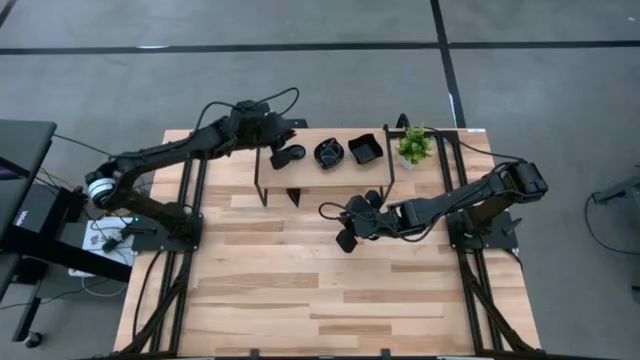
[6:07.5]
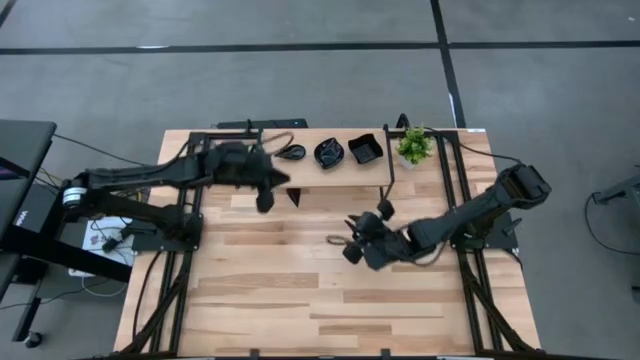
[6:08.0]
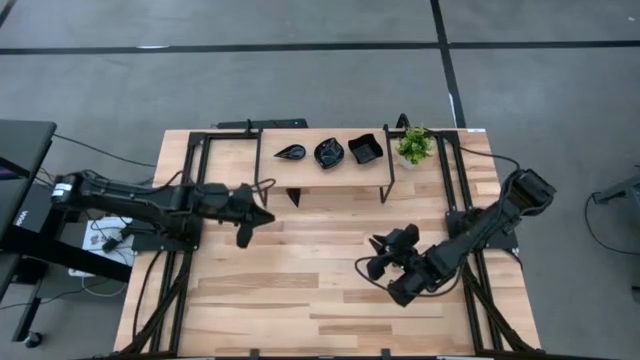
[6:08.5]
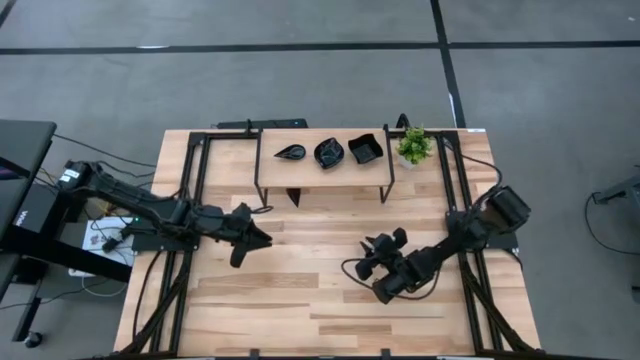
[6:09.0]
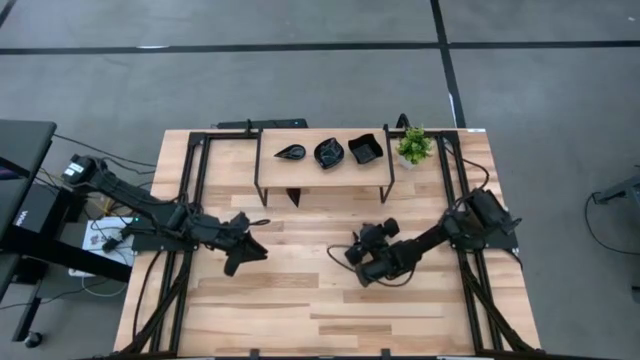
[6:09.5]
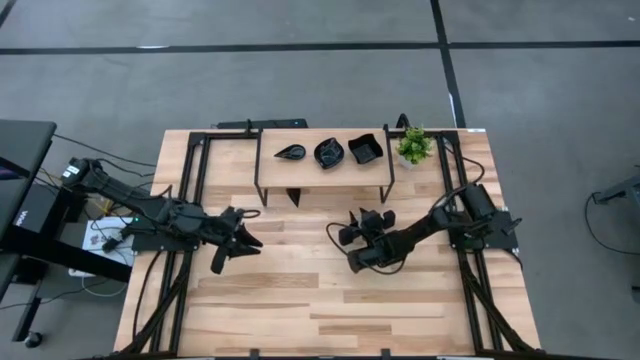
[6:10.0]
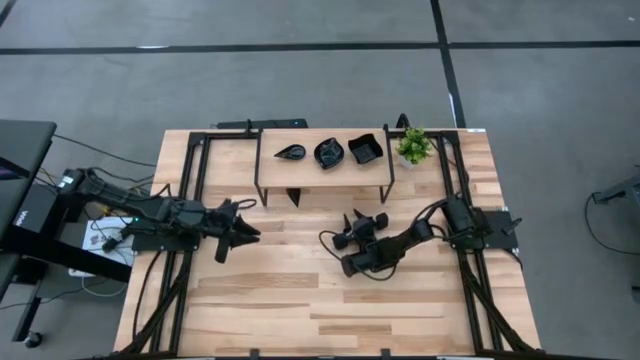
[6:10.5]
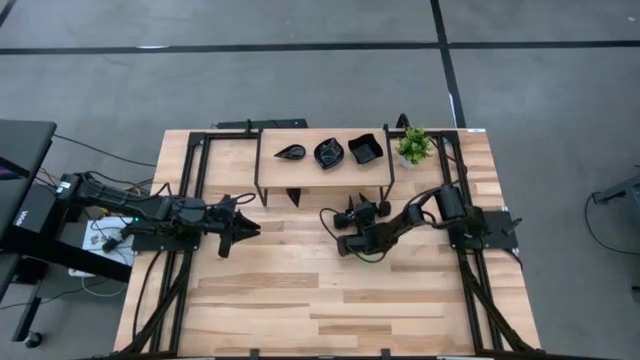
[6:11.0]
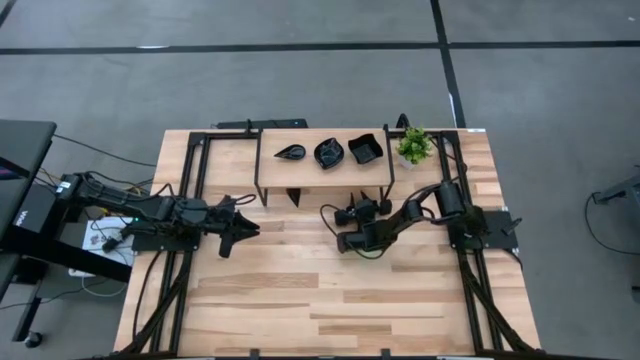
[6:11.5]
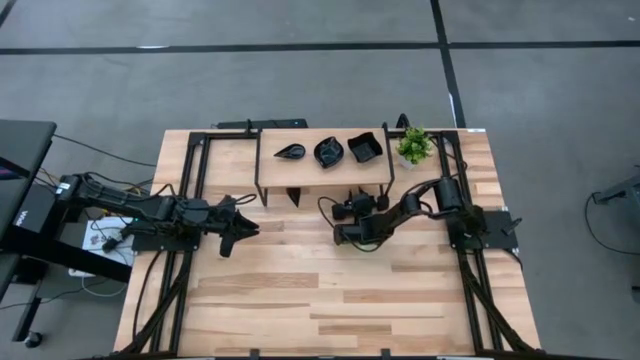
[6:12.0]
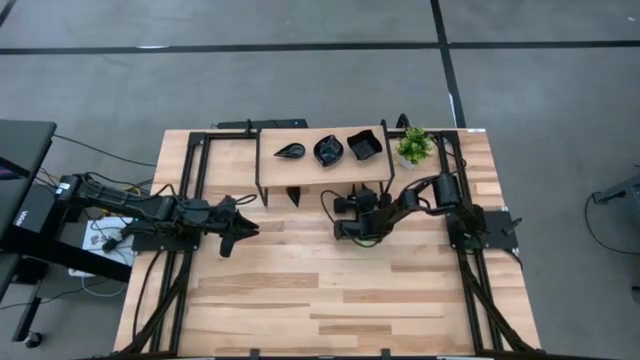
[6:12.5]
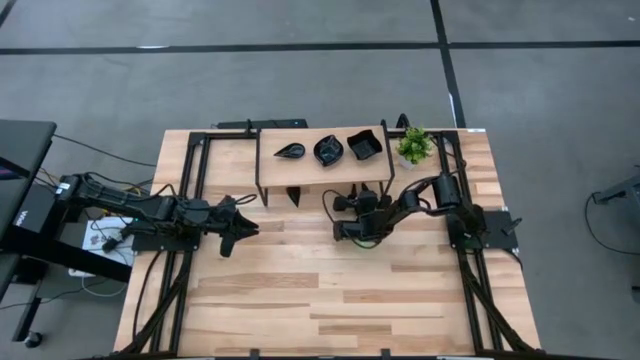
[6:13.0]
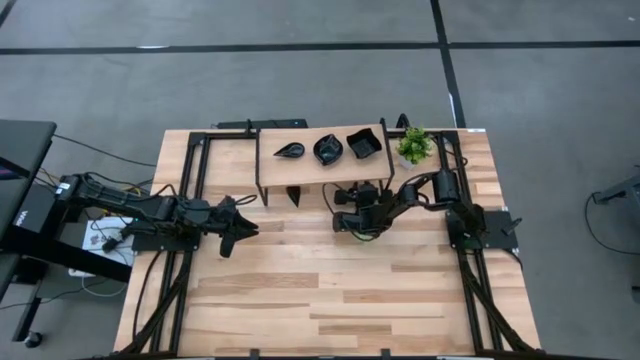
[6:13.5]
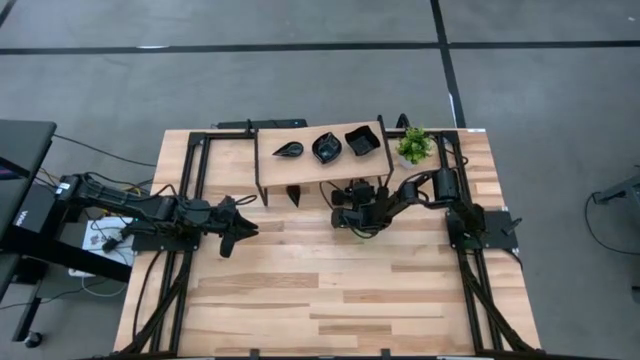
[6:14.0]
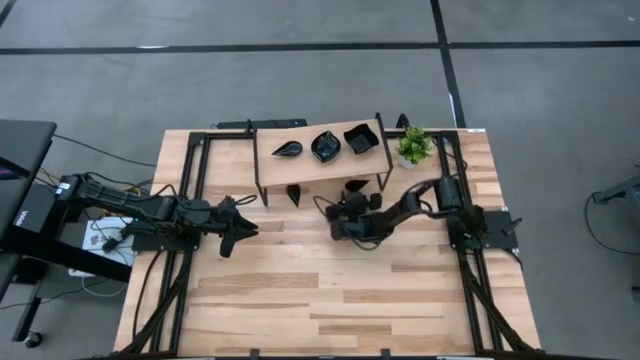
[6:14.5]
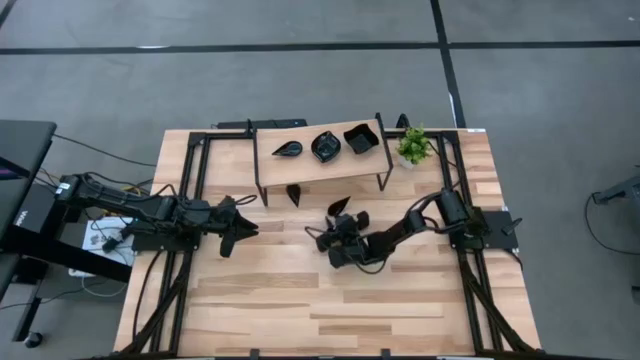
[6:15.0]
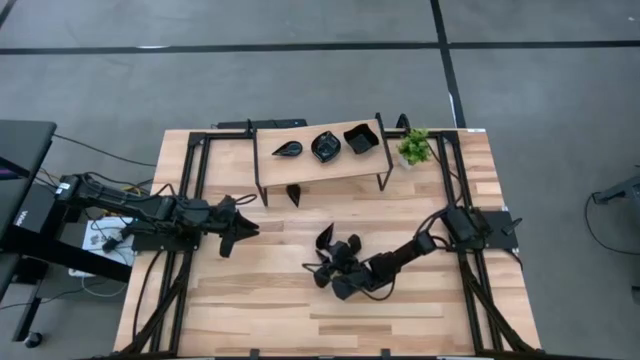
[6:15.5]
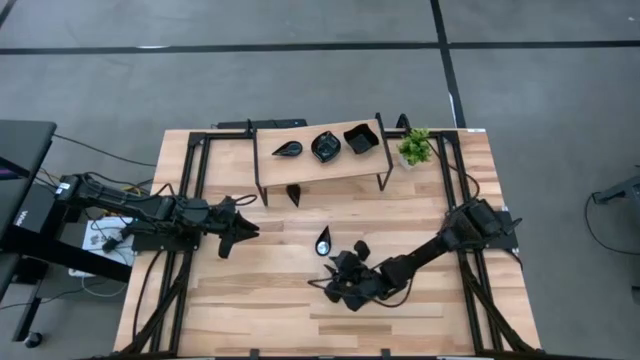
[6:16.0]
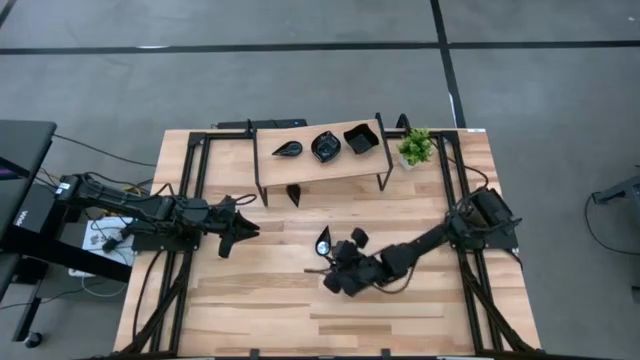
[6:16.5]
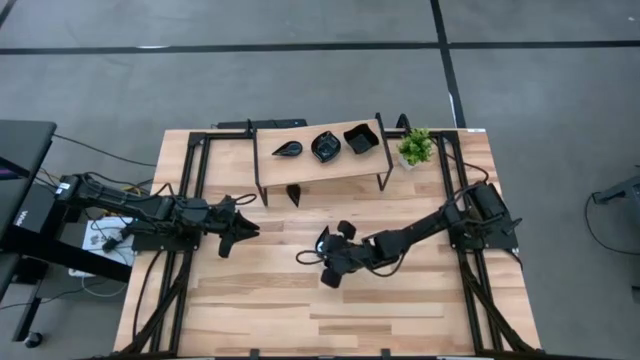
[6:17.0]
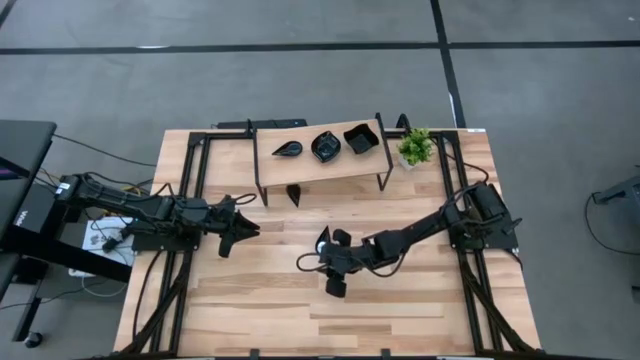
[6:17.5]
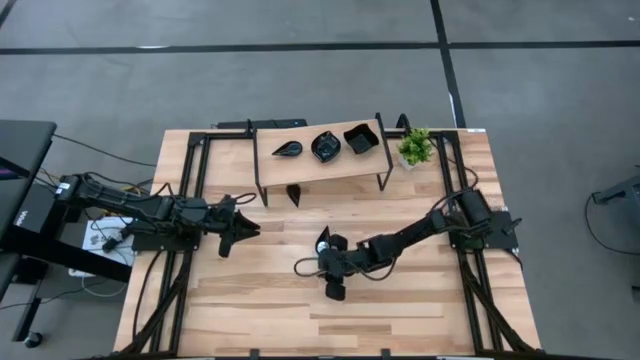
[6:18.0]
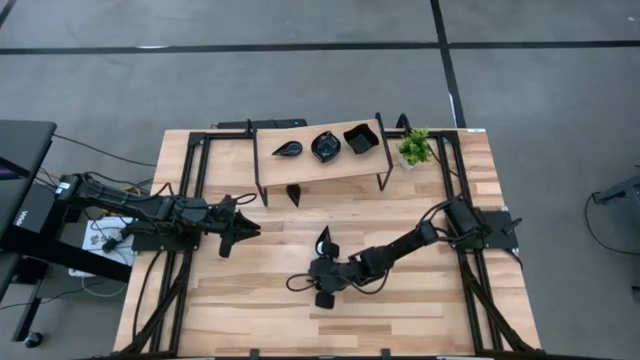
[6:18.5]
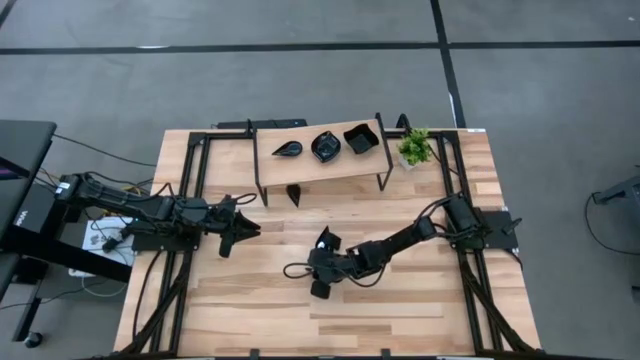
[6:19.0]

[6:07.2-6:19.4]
Task: Pick & Place Mini shaped plates
Stack the black drop shaped plate on the black drop shaped plate on the shelf

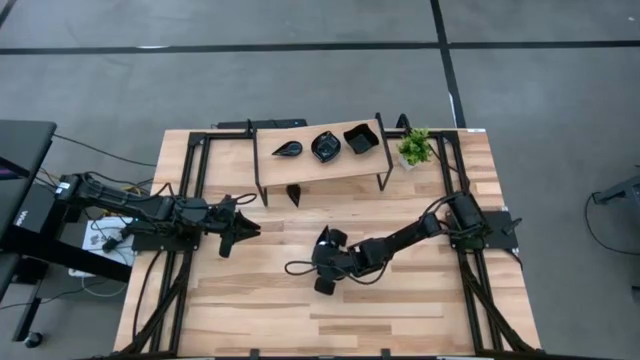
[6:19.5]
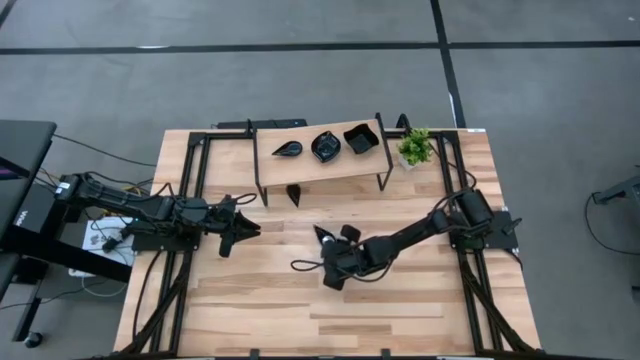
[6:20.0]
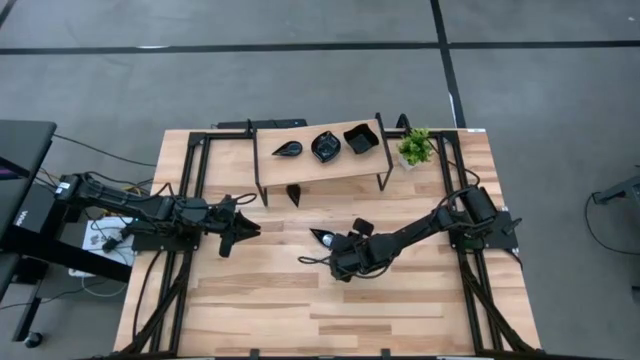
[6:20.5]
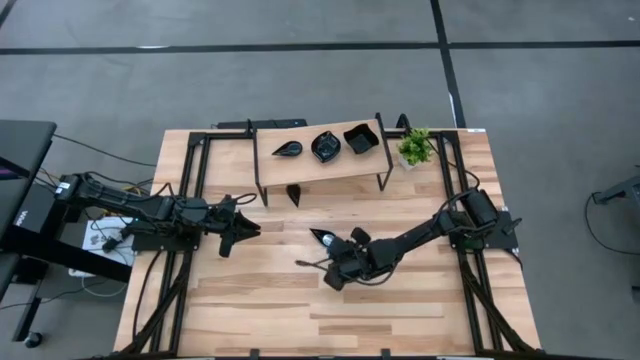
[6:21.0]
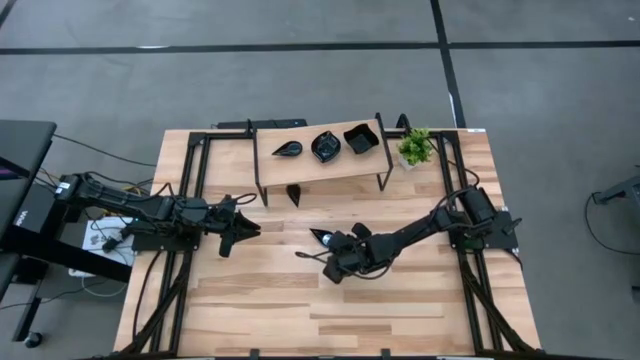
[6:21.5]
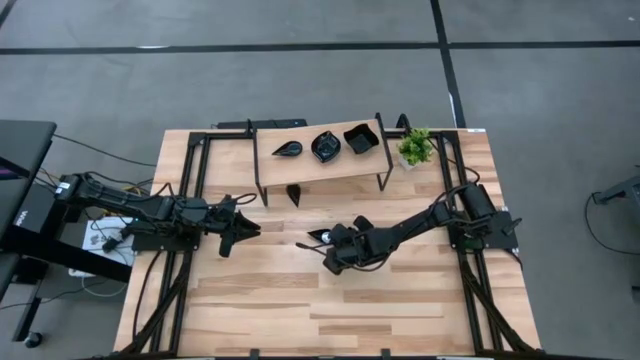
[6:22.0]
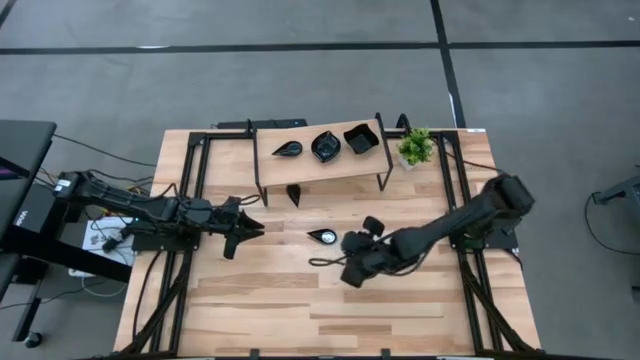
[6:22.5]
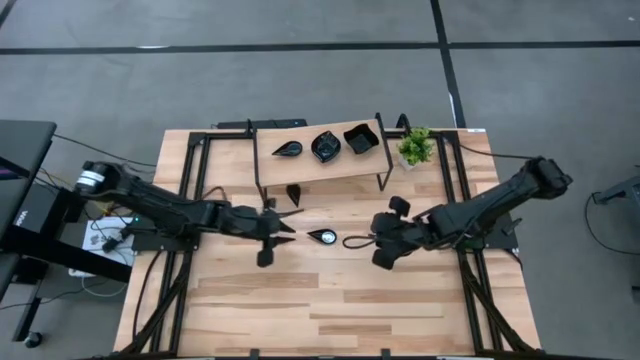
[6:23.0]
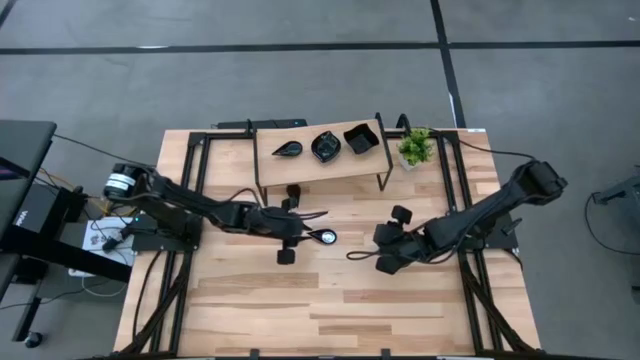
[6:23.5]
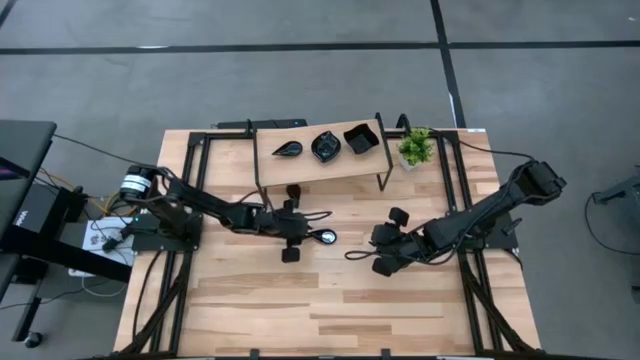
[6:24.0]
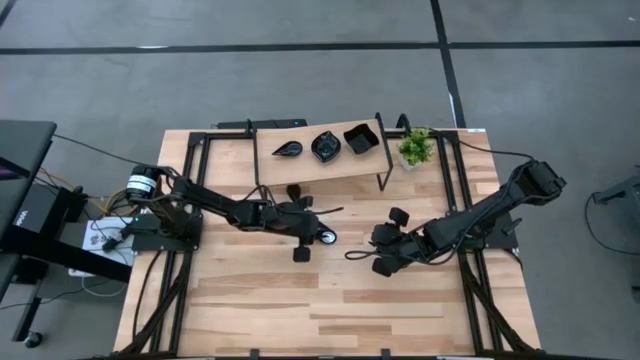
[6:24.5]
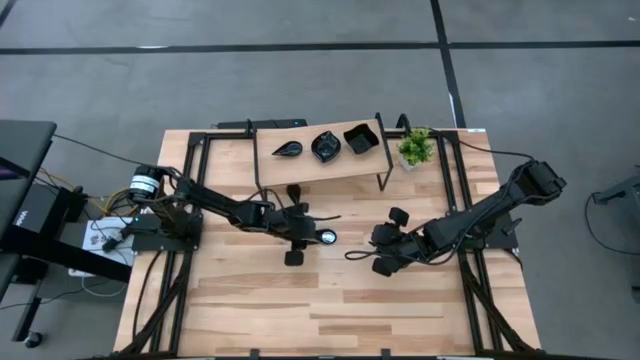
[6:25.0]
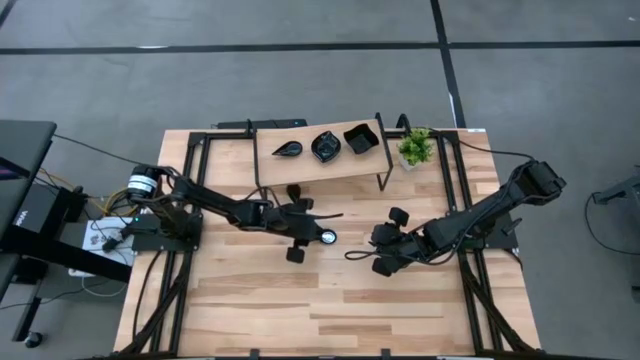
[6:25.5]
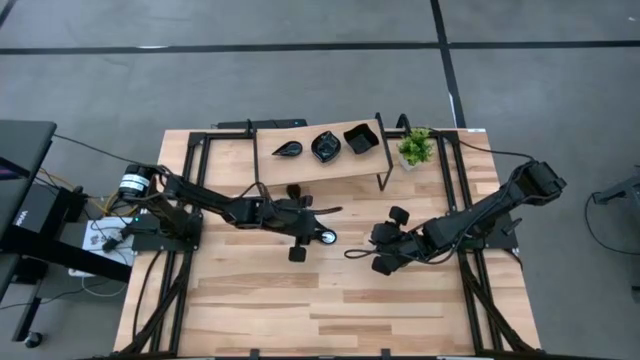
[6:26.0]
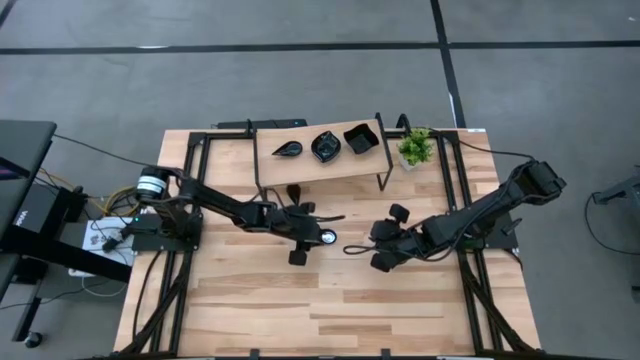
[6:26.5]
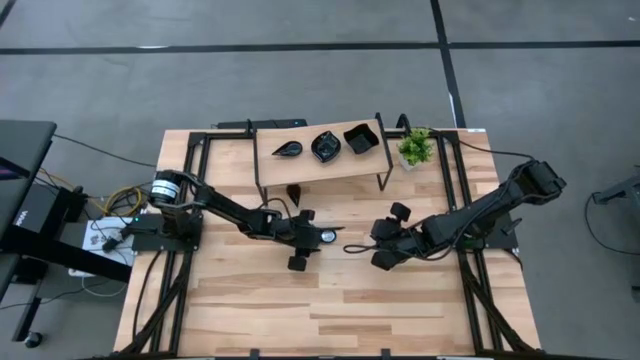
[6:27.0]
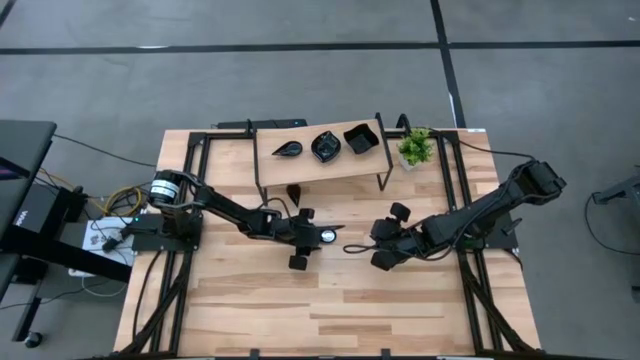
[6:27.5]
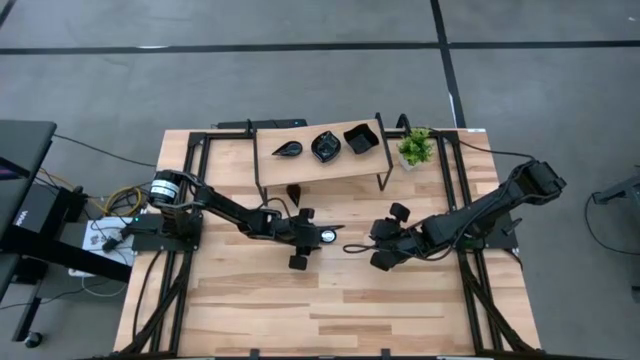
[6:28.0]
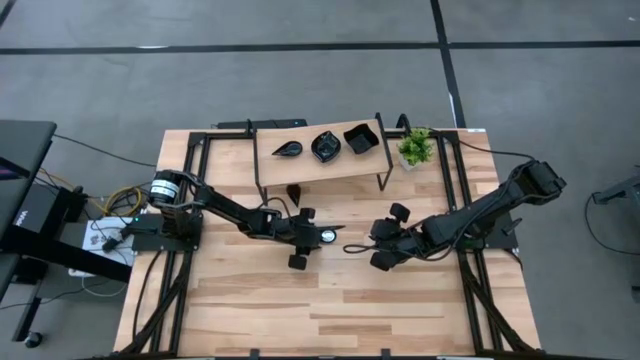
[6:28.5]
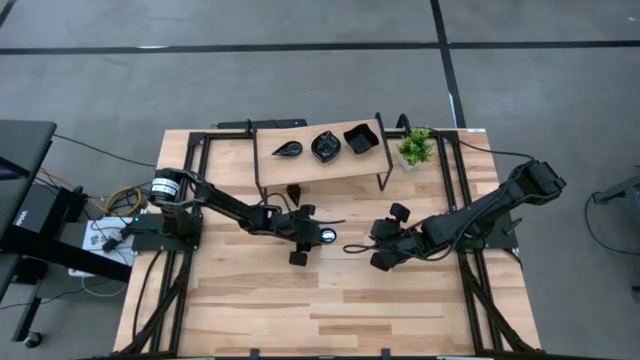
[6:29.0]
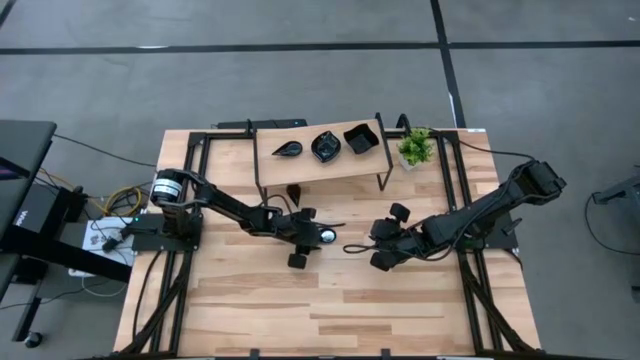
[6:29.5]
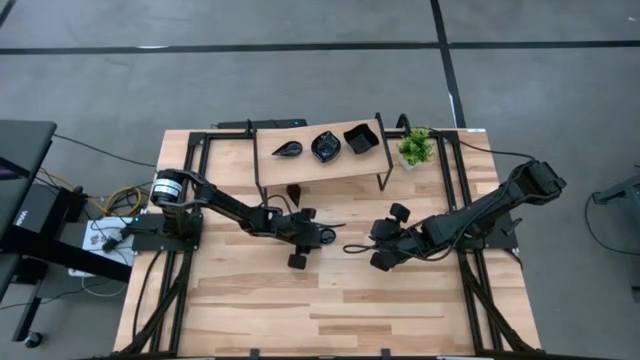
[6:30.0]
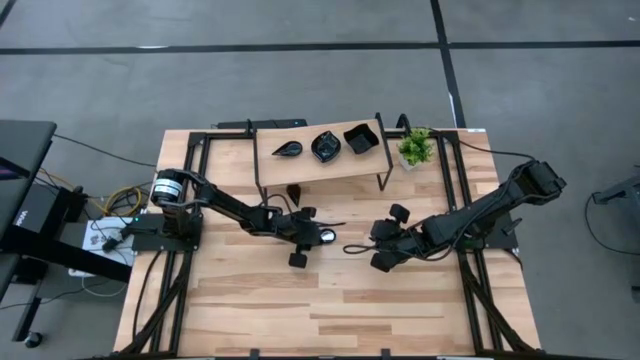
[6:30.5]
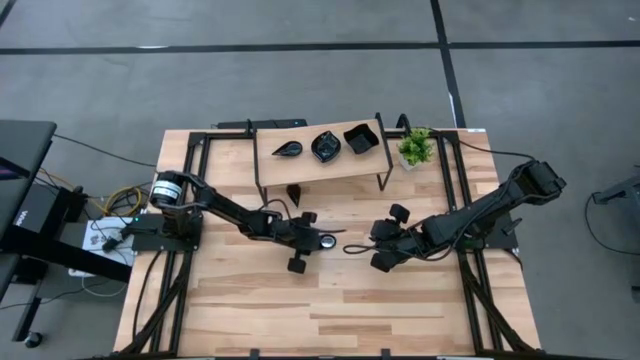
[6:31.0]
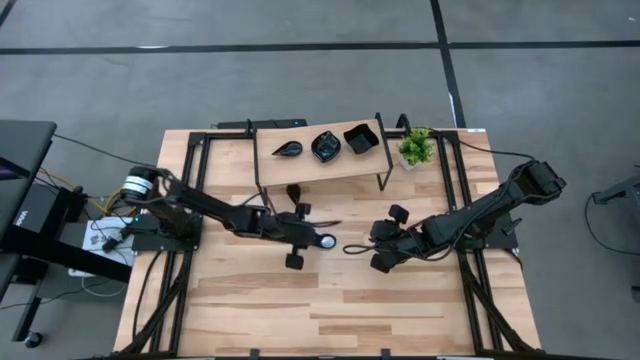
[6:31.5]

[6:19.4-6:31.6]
Stack the black drop shaped plate on the black drop shaped plate on the shelf
